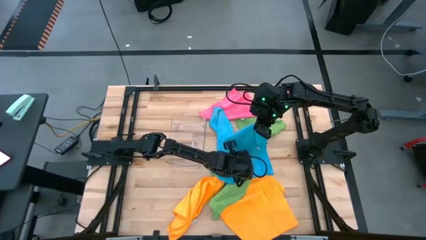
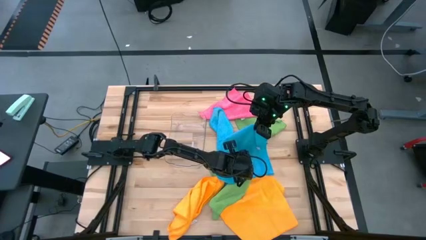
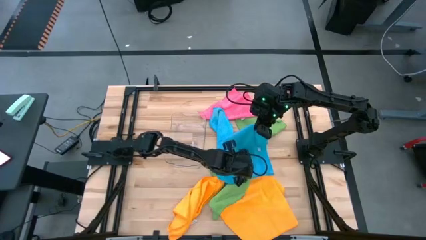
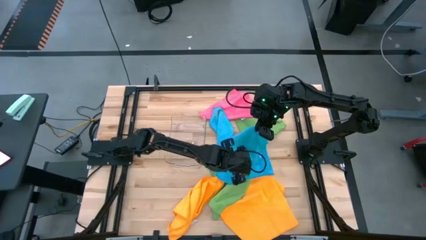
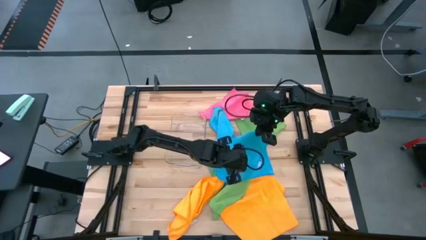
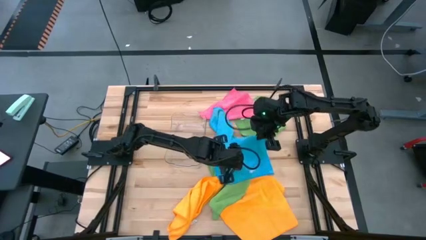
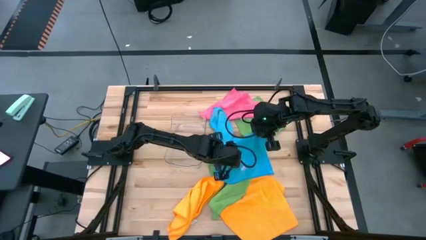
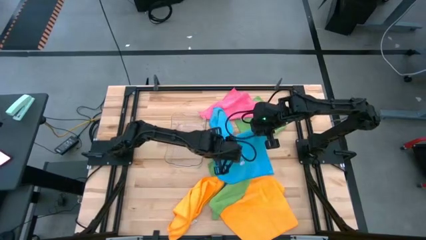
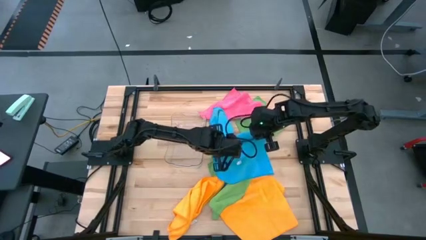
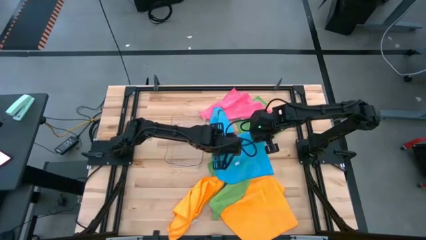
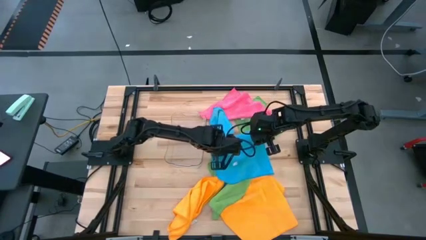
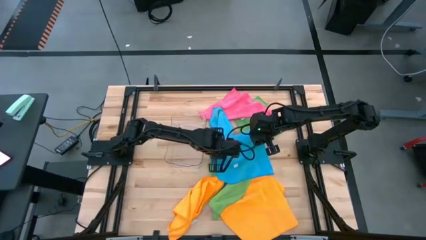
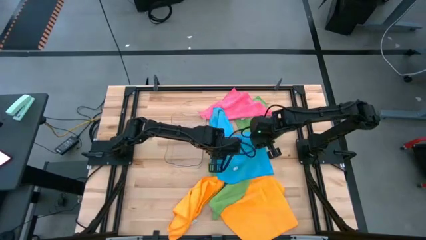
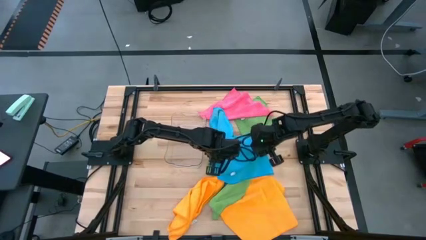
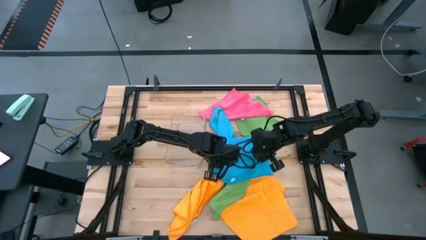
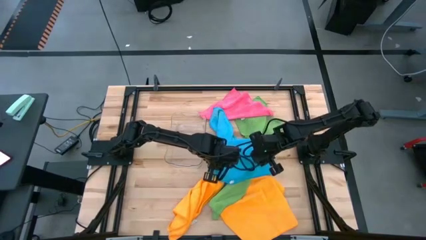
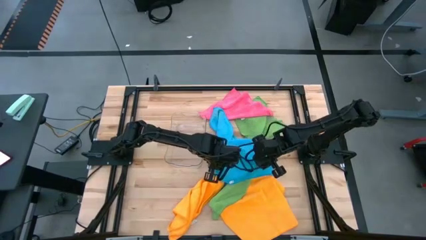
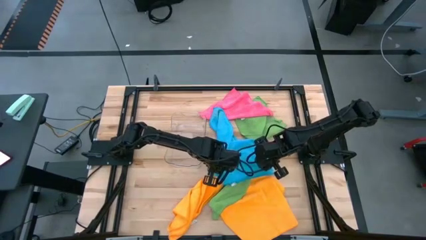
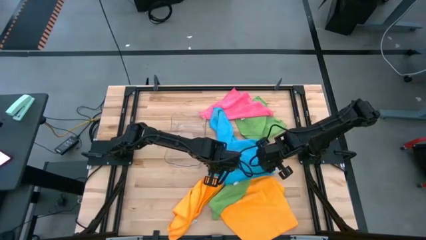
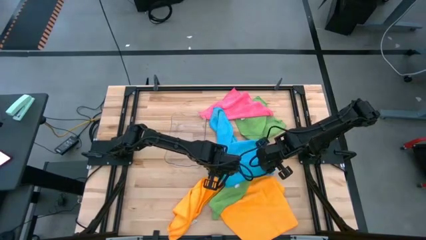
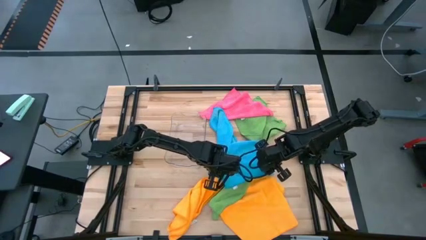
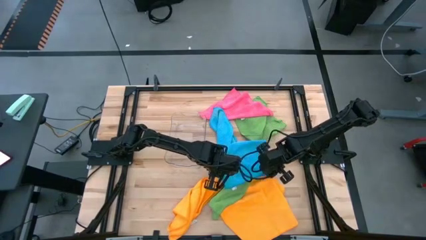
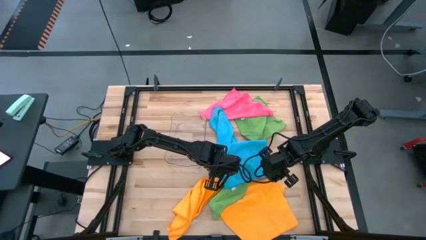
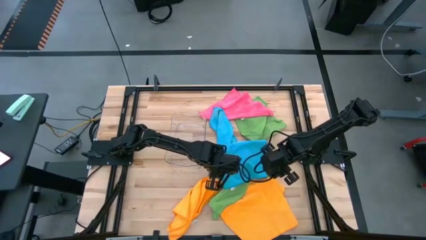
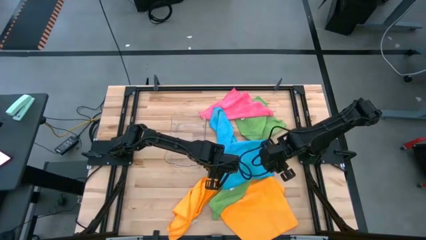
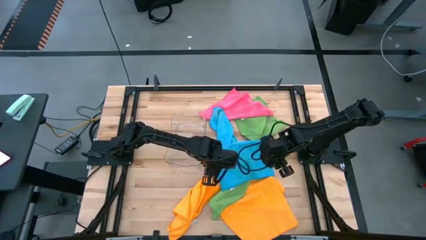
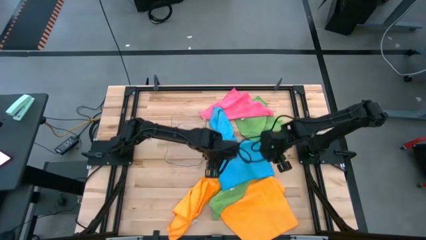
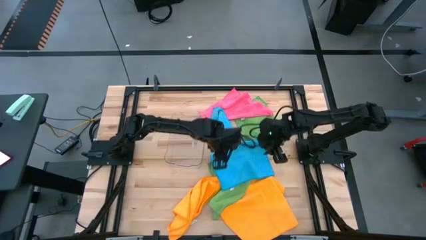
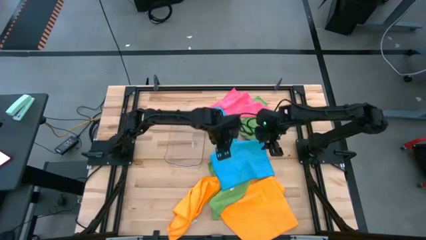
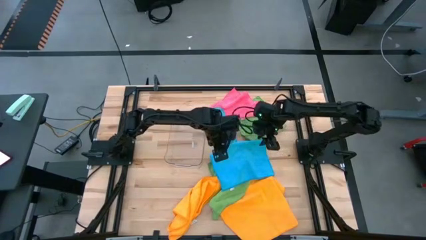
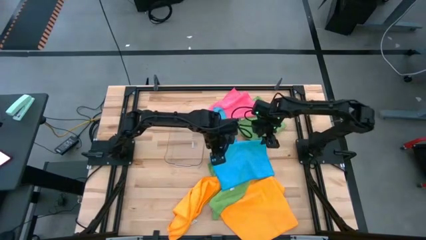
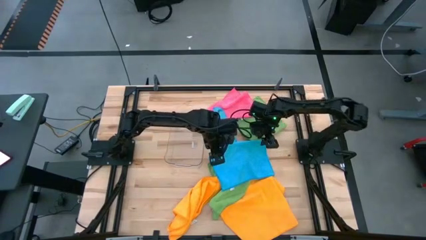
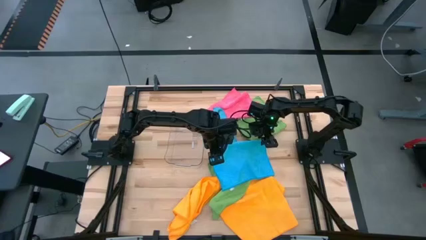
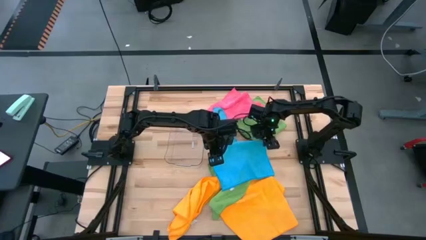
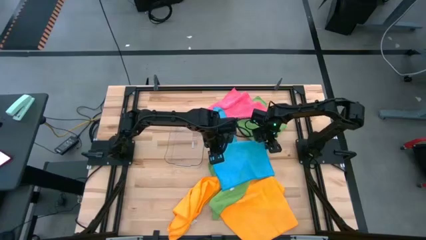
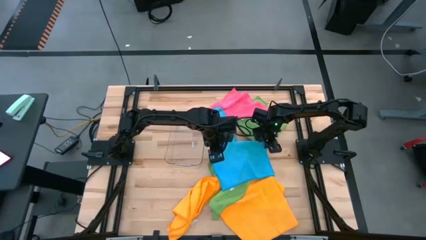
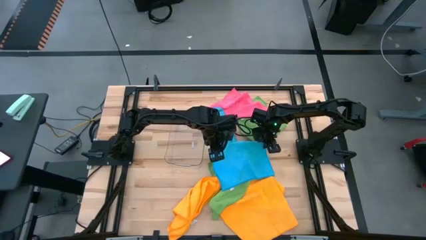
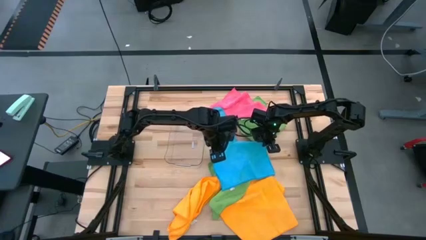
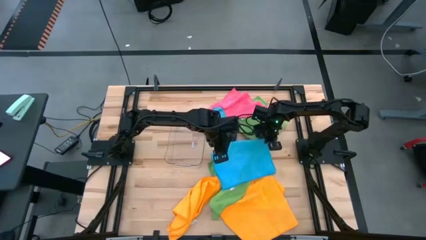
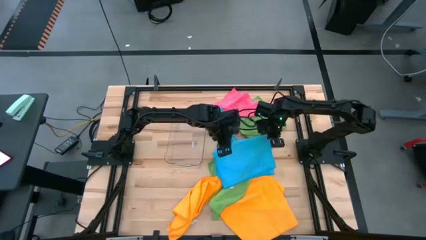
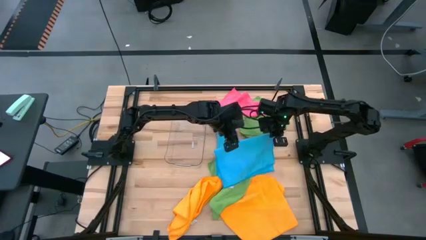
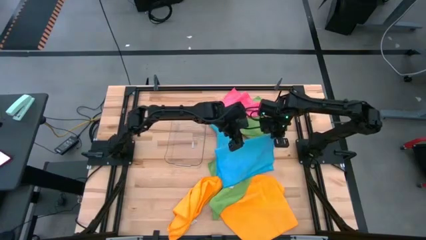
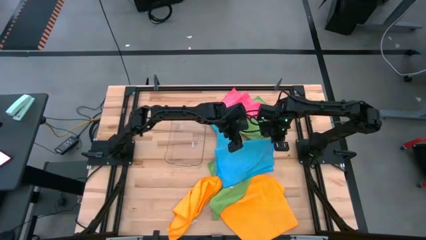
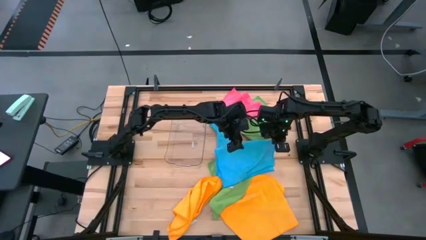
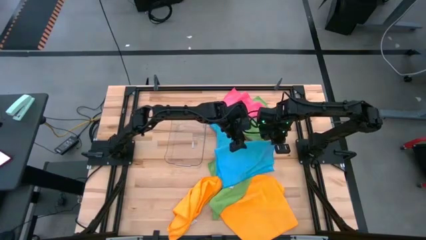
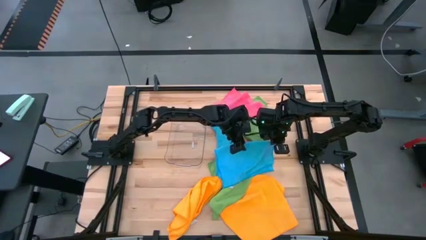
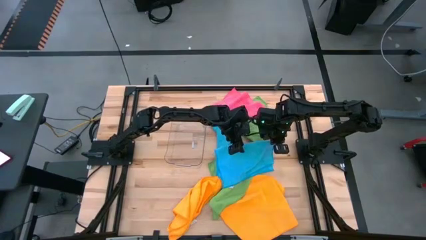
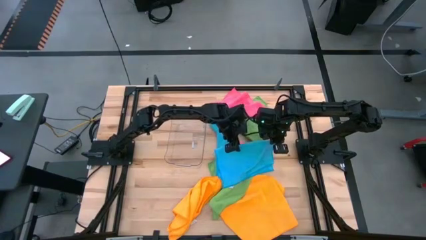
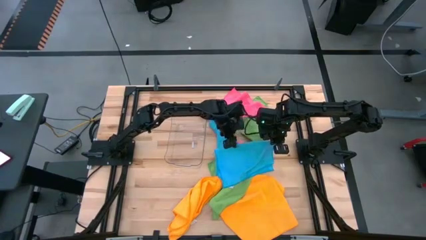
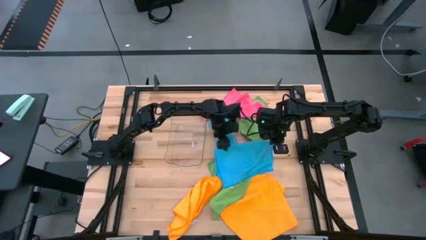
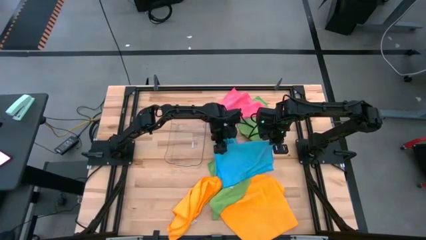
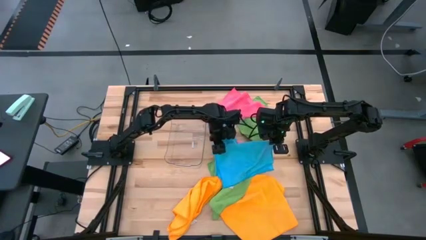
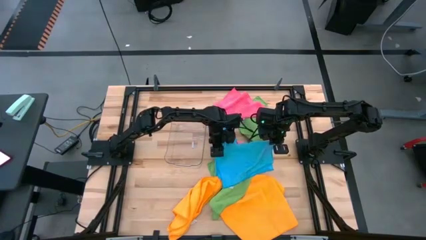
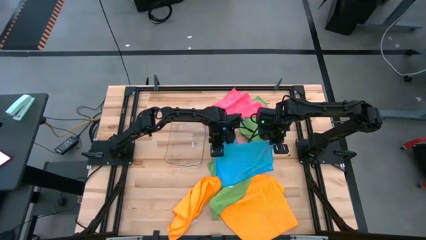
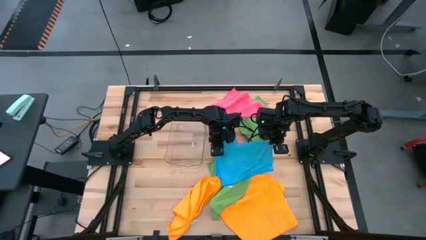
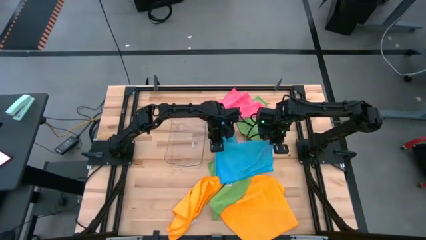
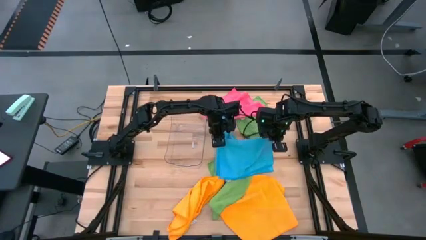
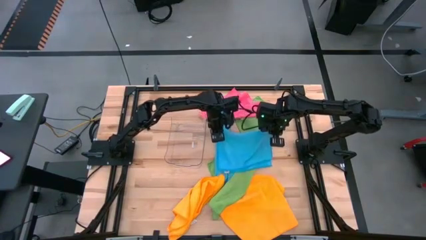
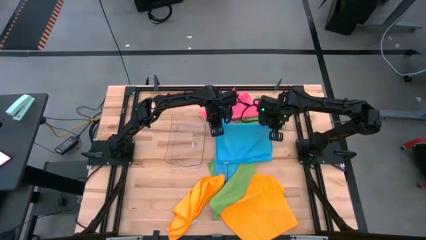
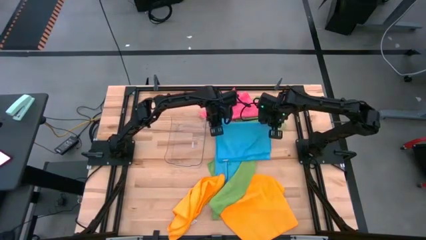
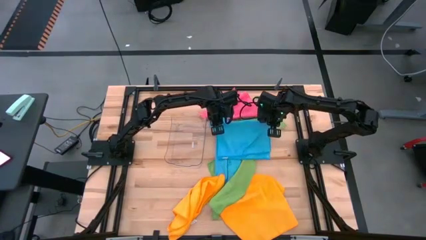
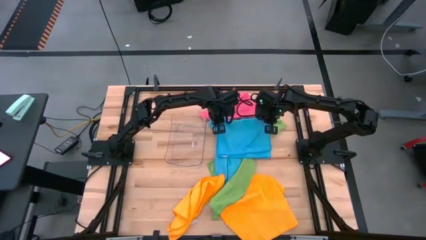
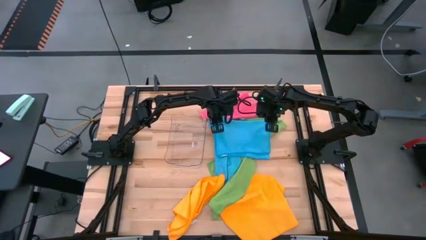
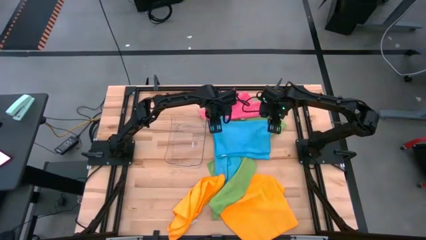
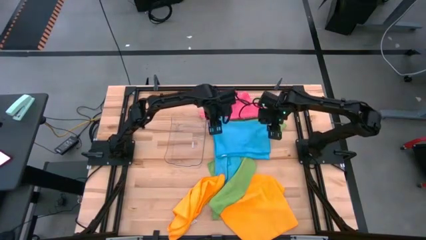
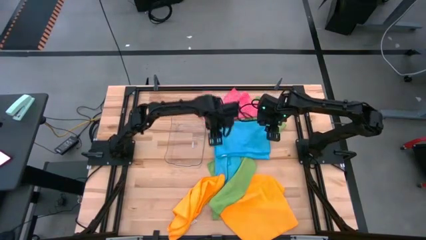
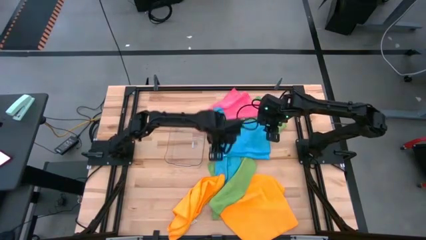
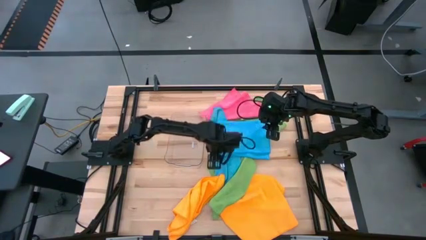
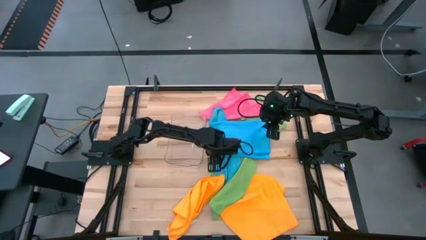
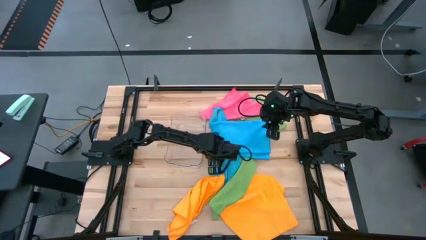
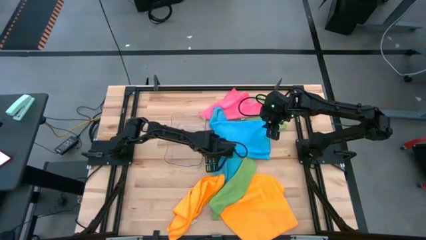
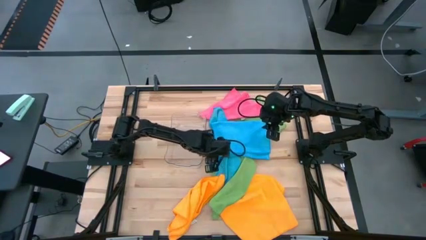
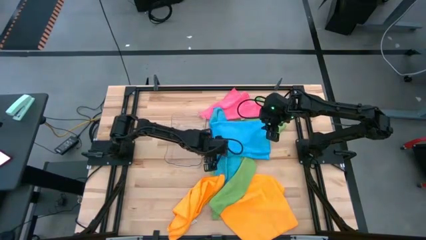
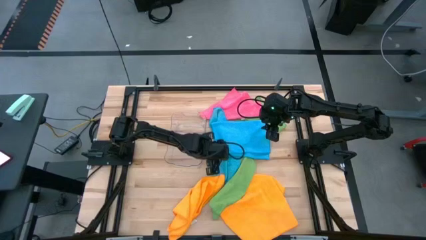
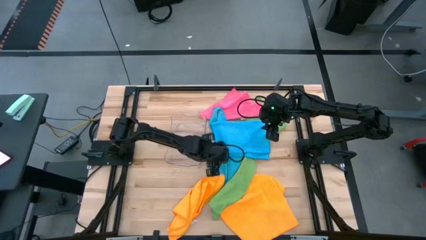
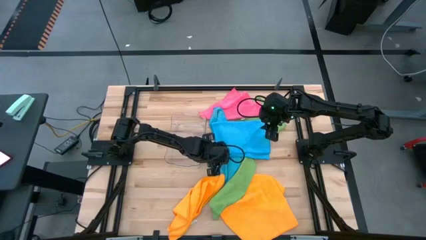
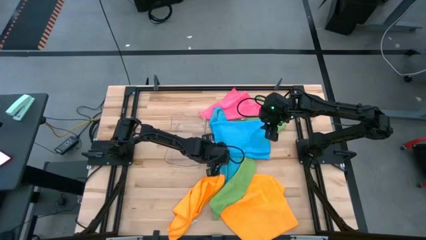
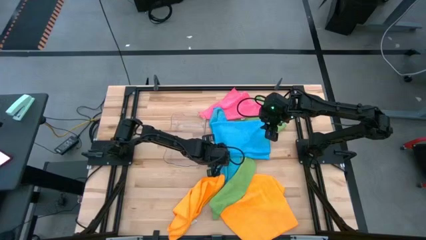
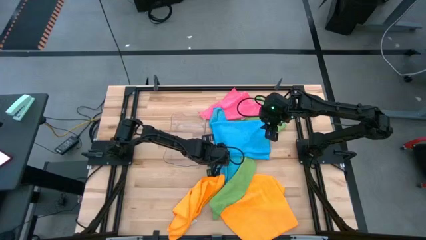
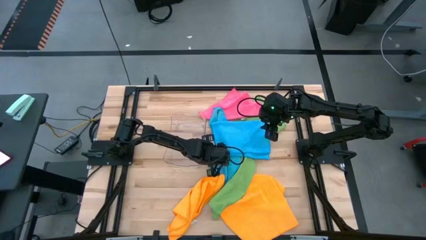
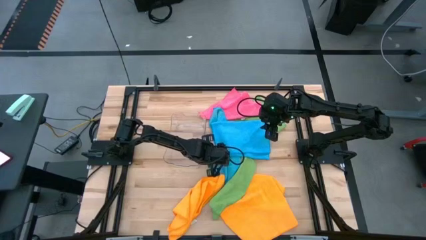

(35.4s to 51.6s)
Task: Fold microfiber towels
Fold the left blue towel
